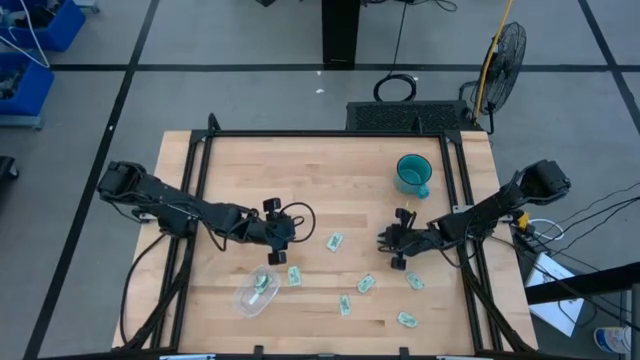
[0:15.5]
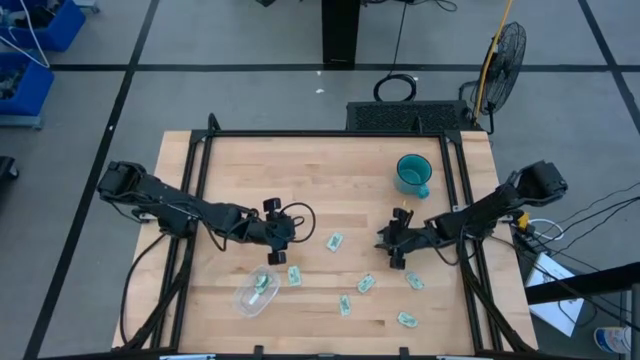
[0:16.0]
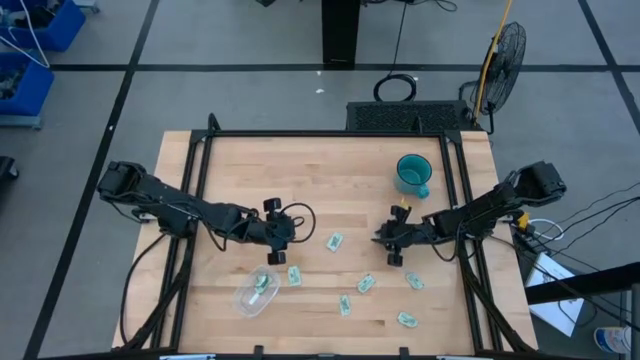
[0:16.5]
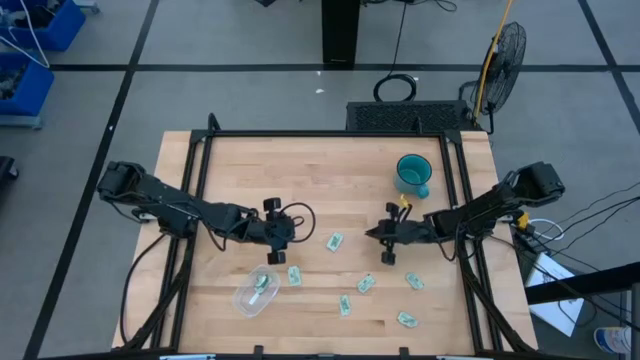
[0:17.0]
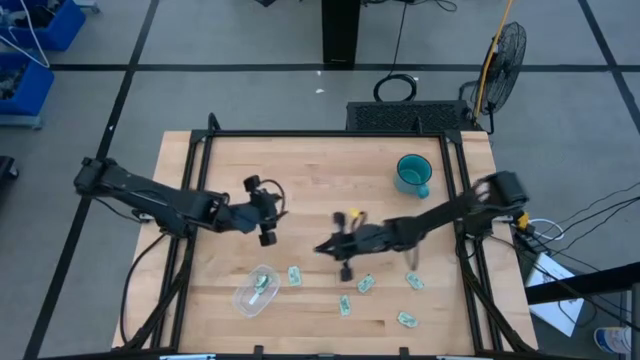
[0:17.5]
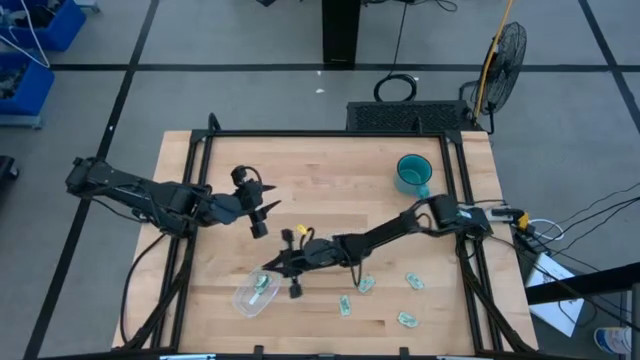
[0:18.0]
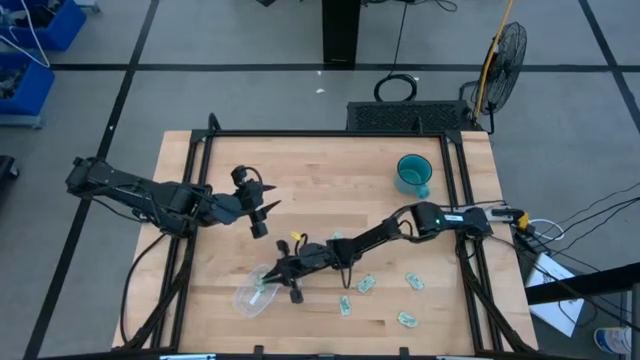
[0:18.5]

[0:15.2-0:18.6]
Task: Pick and place Stevia / Truvia into bins
Put the white stevia packet into the transparent bin

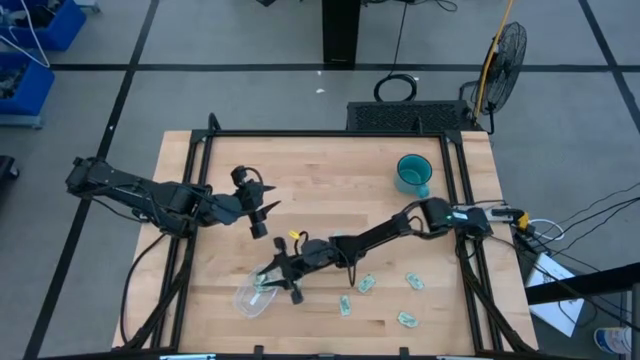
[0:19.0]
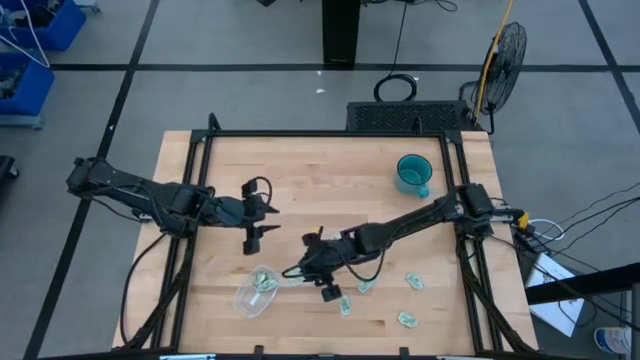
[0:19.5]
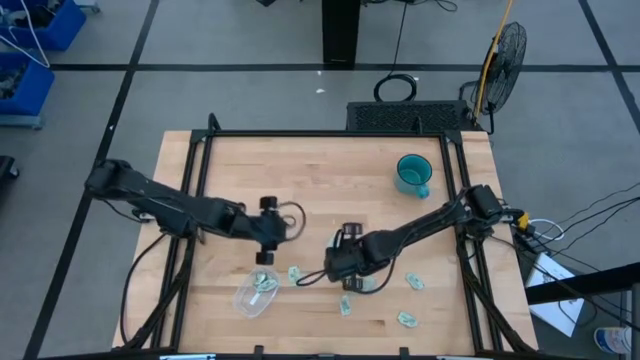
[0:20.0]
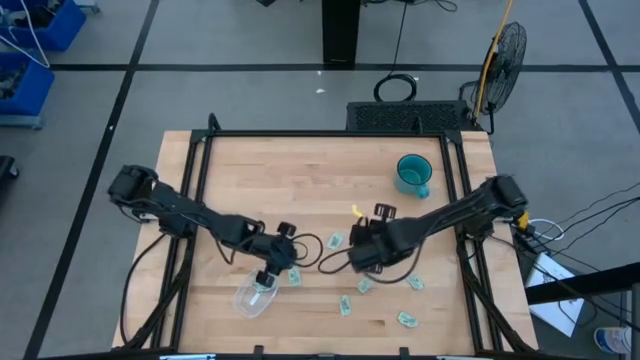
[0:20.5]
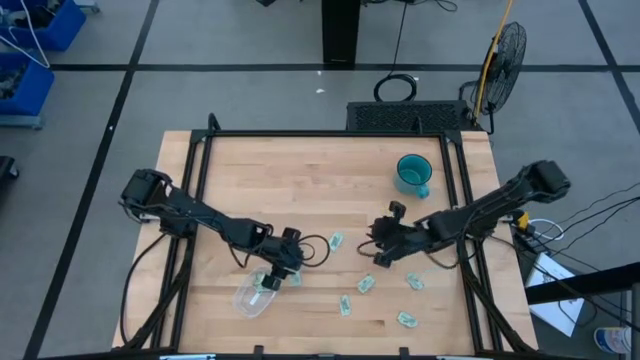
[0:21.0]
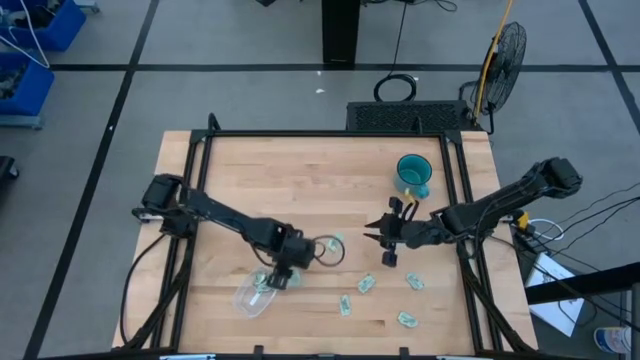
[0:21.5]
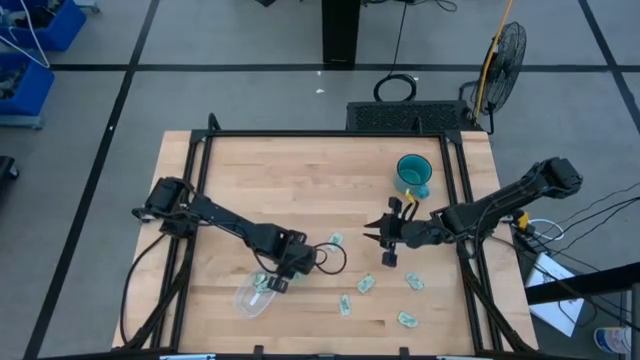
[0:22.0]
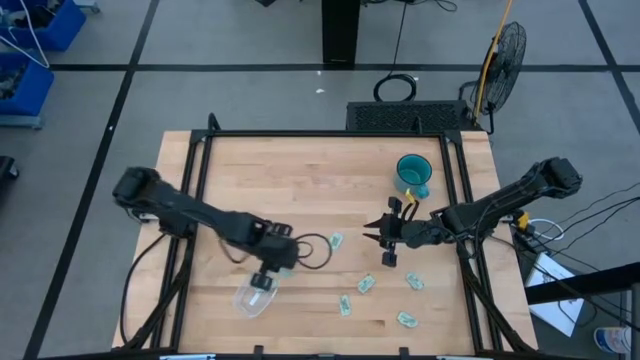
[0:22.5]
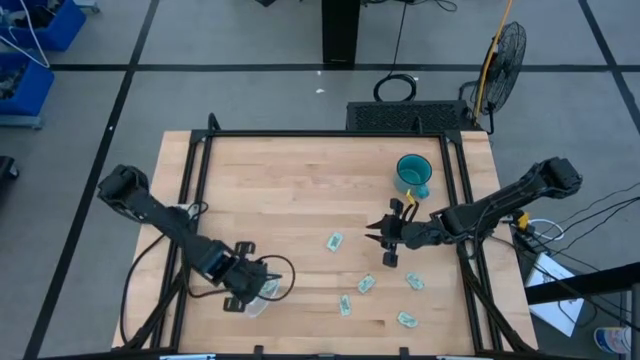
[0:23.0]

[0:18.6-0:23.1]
Put the white stevia packet into the transparent bin

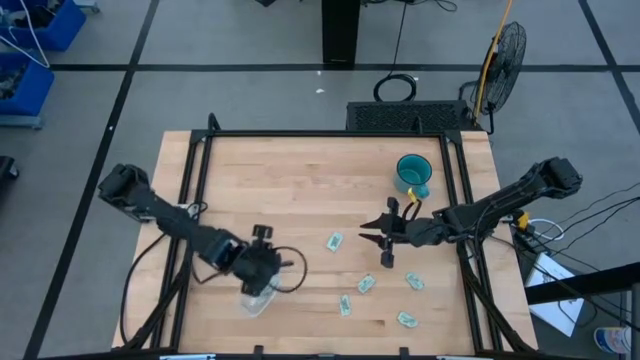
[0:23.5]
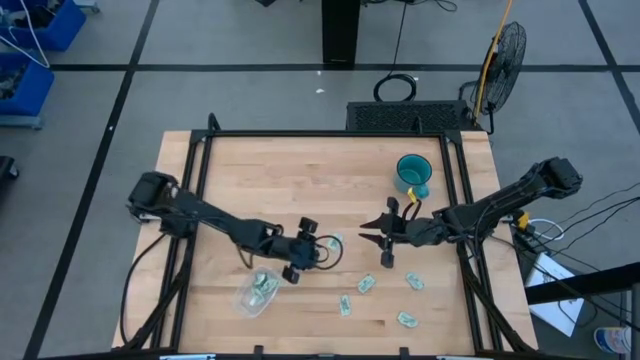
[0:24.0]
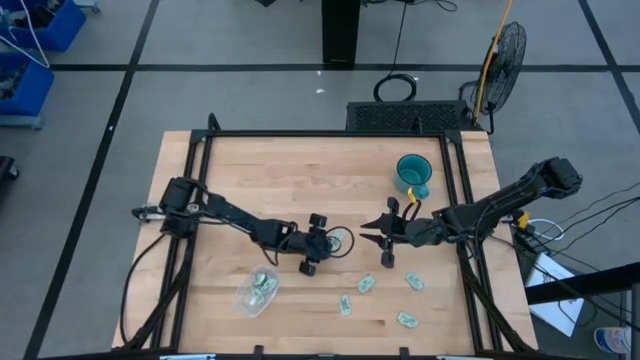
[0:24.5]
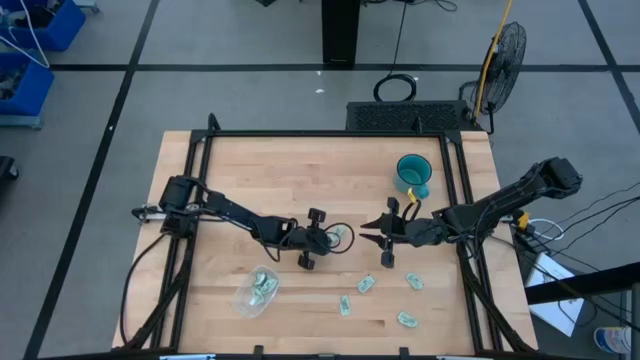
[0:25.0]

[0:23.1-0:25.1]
Put the white stevia packet into the transparent bin

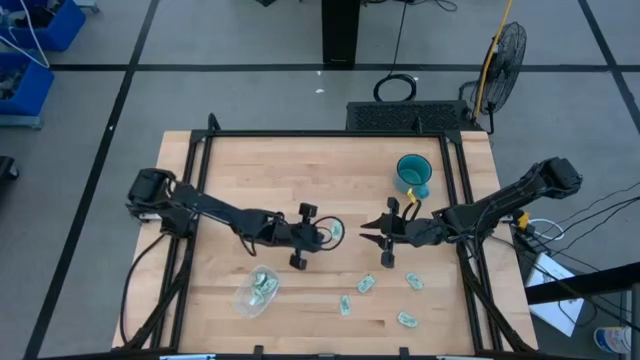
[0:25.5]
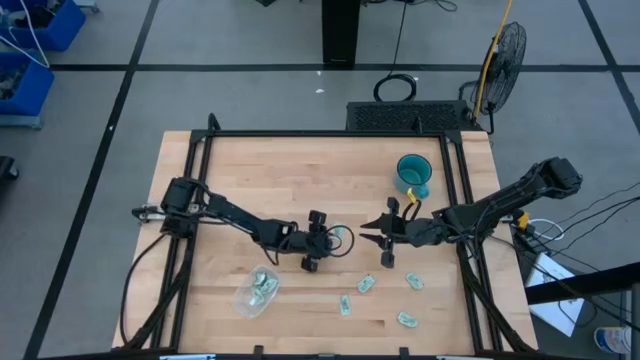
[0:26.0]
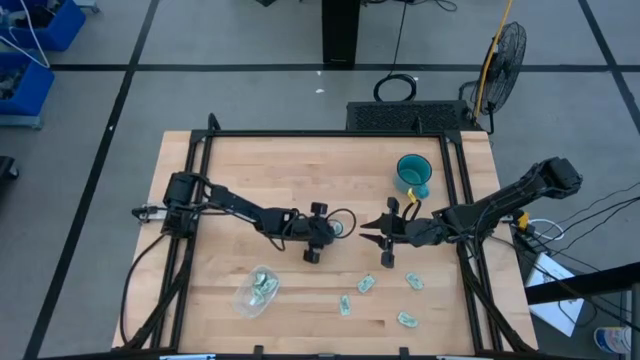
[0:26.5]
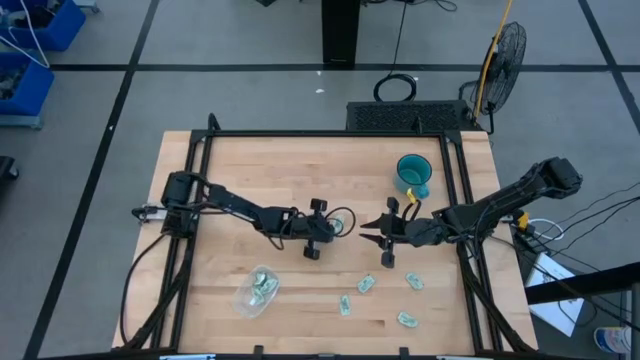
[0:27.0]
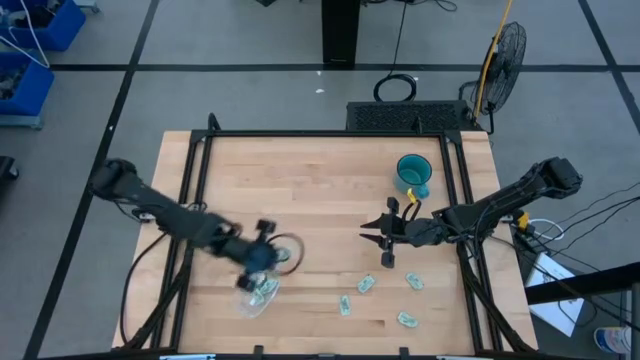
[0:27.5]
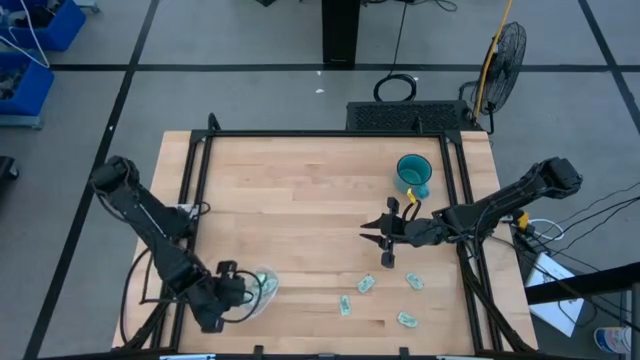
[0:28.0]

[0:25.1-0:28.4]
Put the white stevia packet into the transparent bin

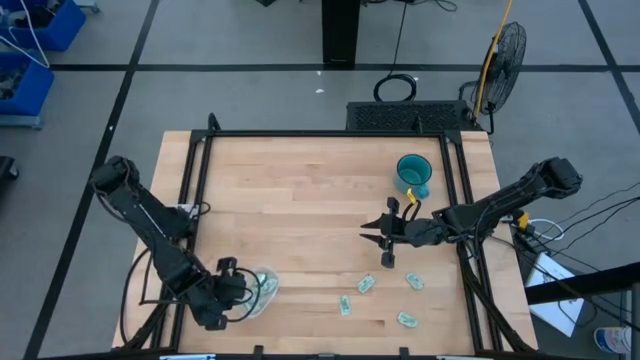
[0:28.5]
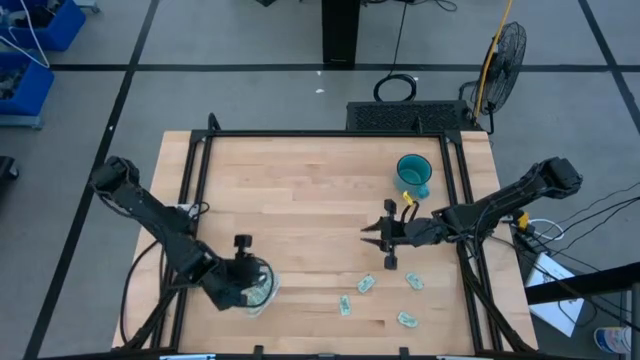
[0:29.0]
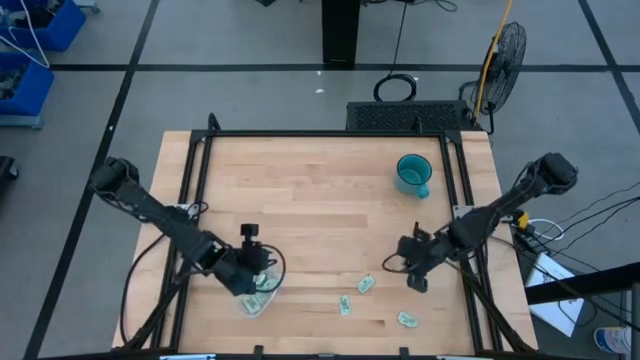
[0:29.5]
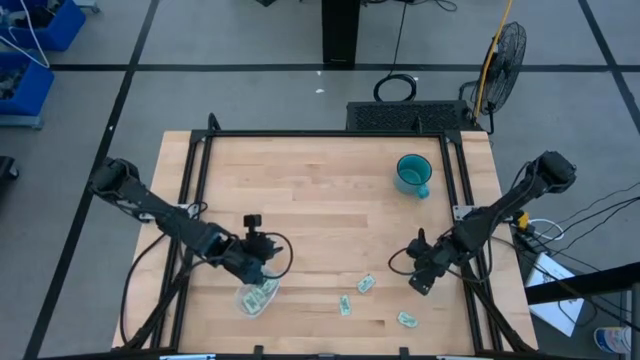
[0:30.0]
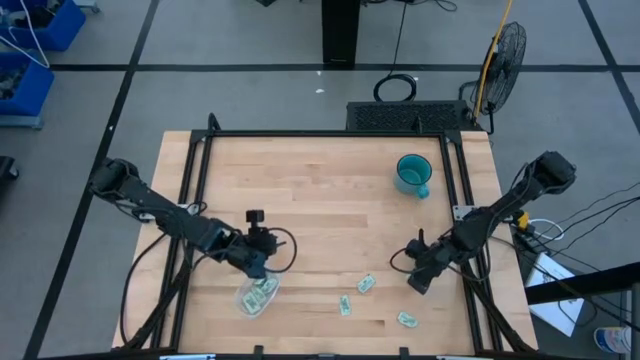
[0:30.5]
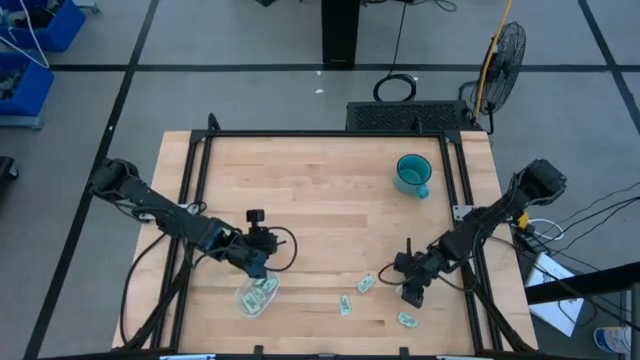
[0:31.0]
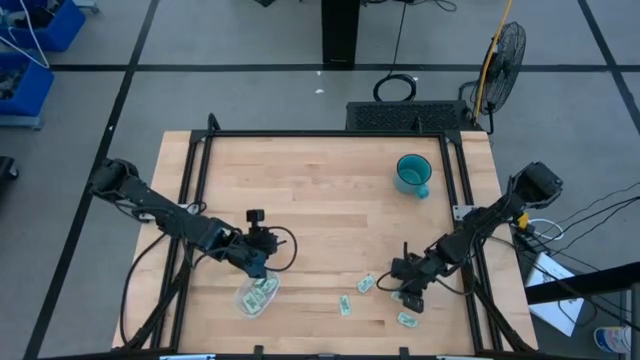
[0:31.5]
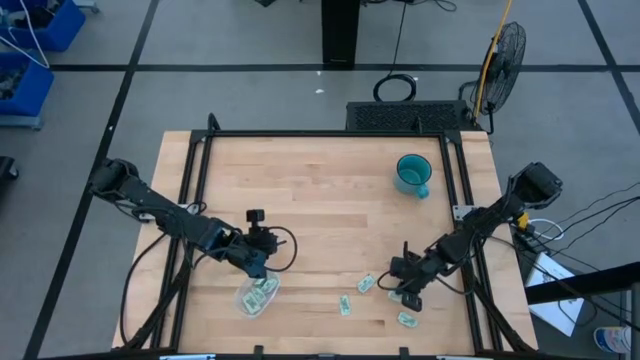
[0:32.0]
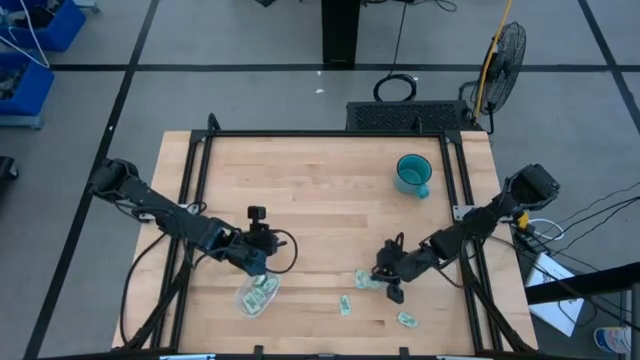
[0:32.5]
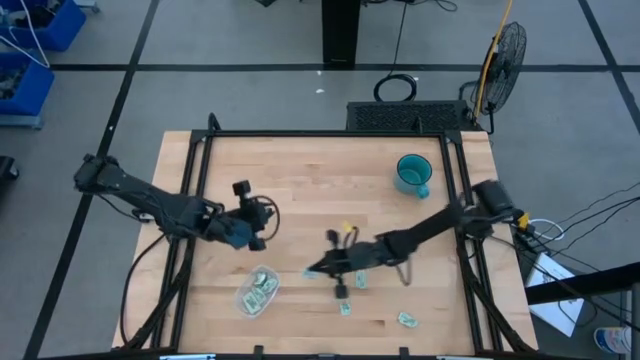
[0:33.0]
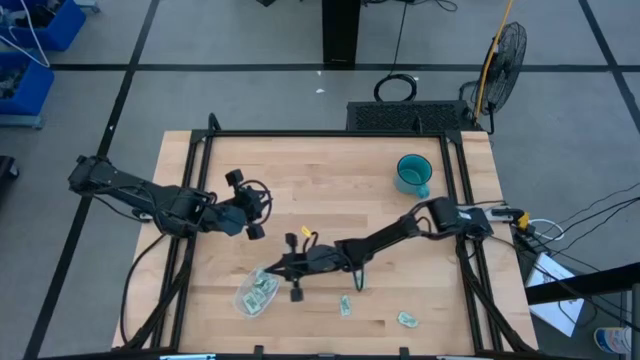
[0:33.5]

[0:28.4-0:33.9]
Put the white stevia packet into the transparent bin

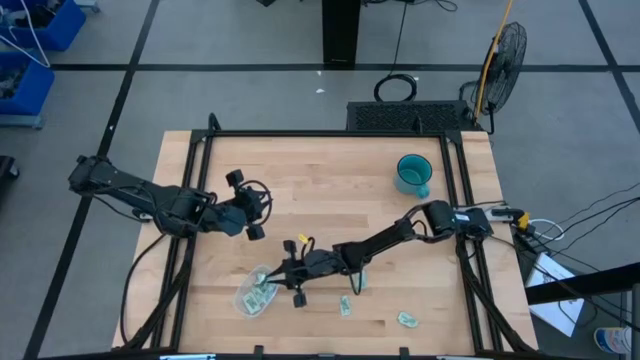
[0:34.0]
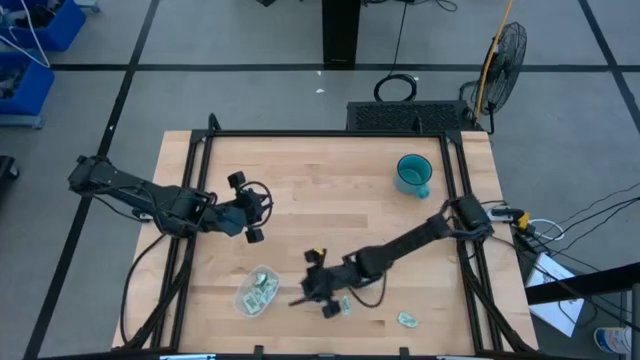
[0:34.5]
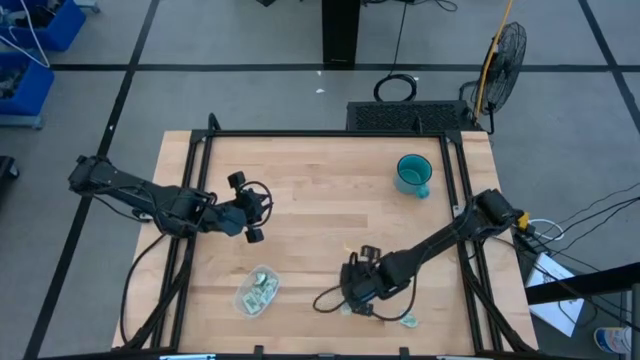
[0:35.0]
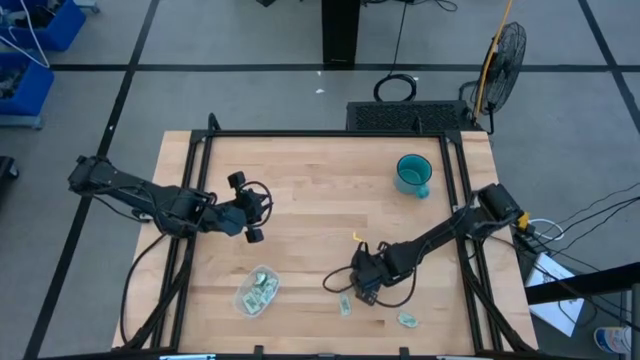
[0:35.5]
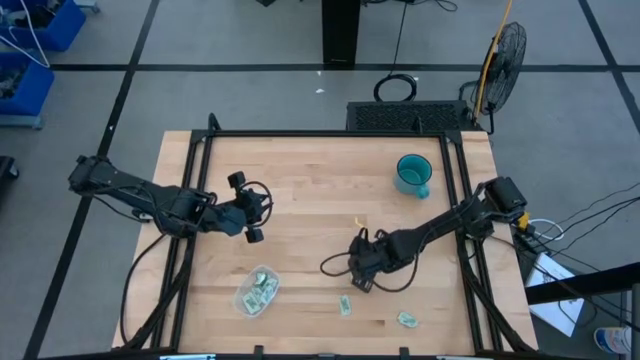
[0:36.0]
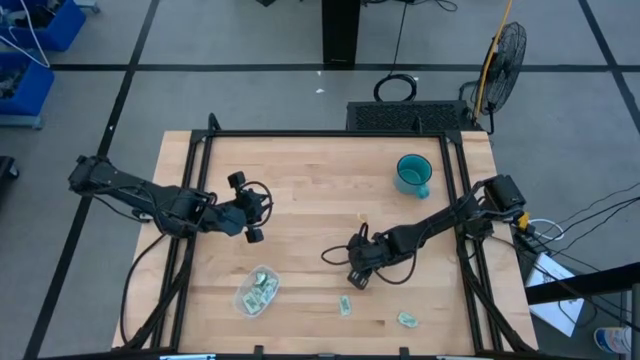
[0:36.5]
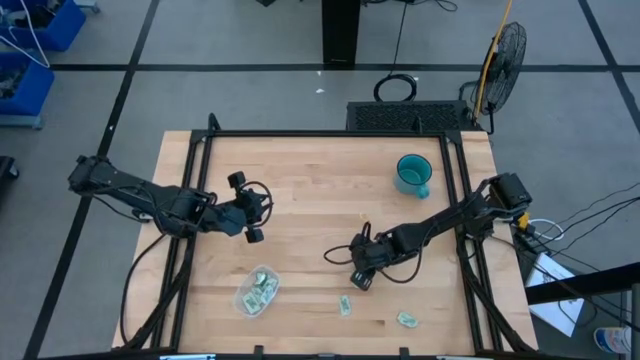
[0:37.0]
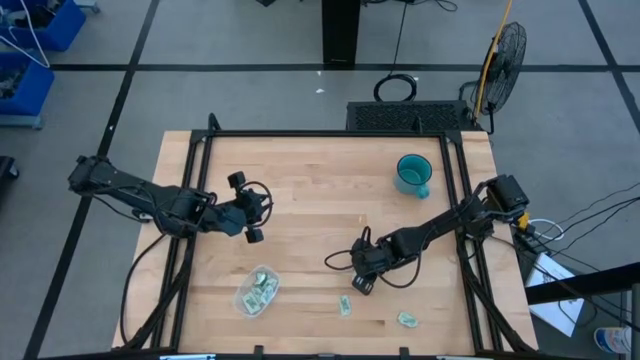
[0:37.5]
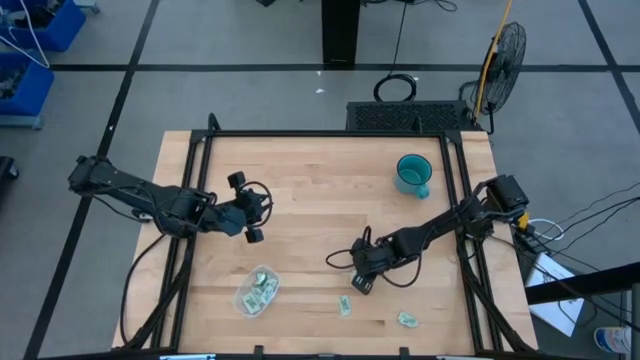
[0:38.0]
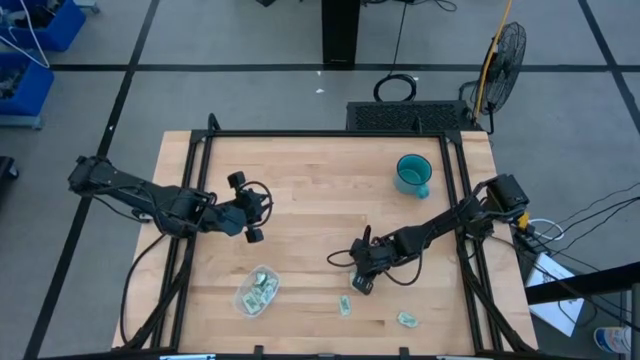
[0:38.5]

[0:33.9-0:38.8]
Put the white stevia packet into the transparent bin
